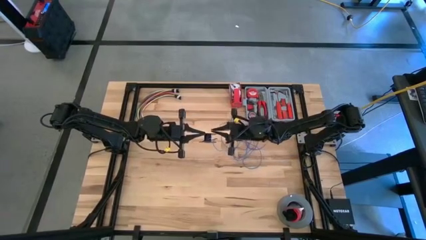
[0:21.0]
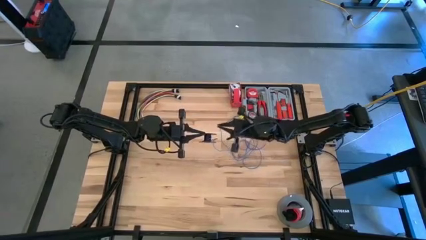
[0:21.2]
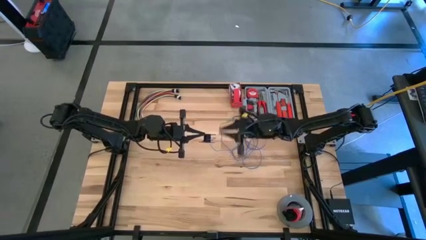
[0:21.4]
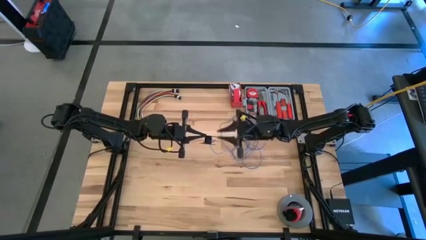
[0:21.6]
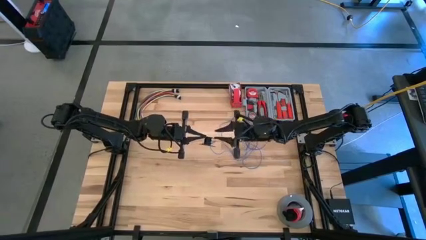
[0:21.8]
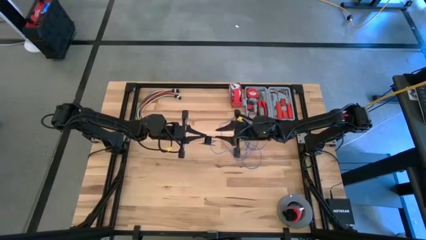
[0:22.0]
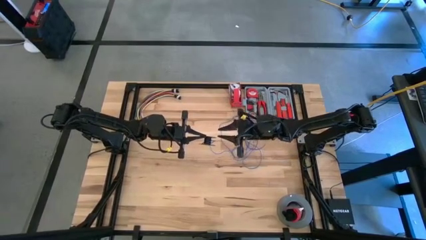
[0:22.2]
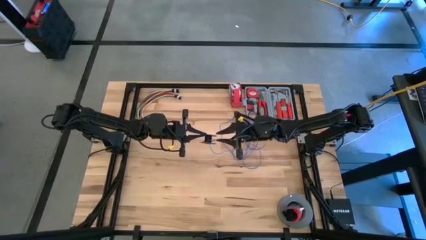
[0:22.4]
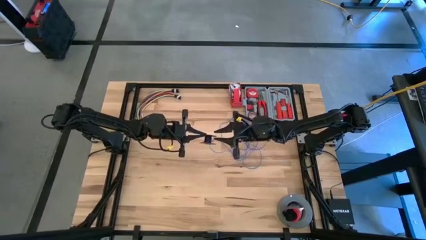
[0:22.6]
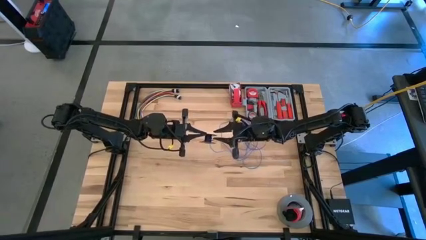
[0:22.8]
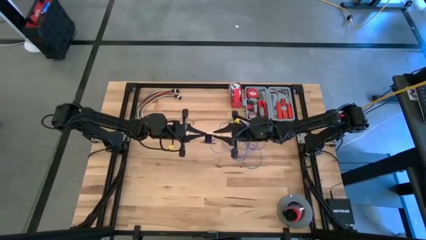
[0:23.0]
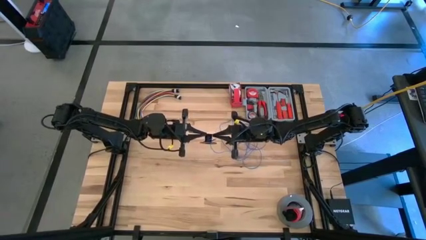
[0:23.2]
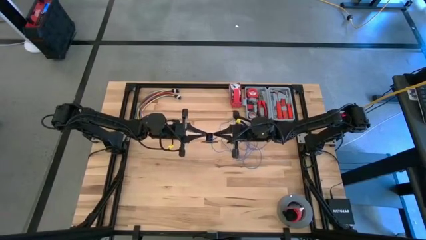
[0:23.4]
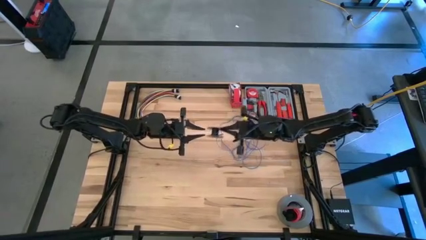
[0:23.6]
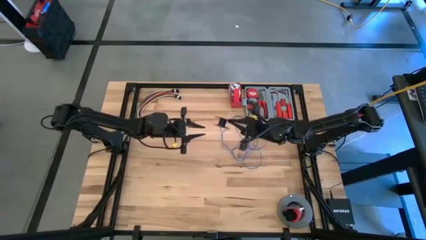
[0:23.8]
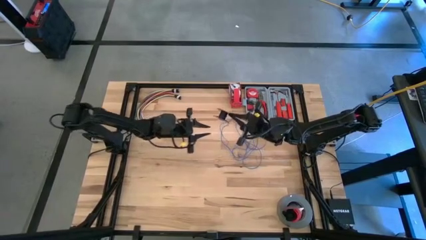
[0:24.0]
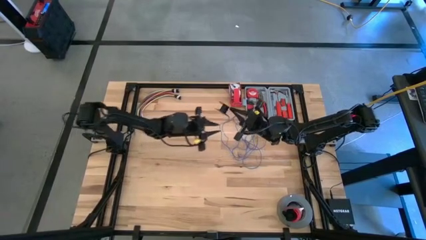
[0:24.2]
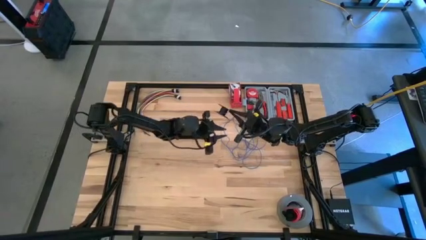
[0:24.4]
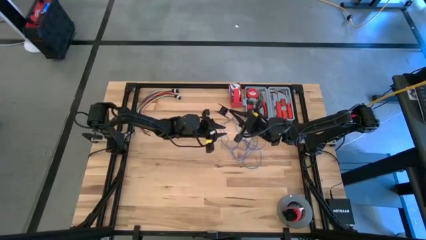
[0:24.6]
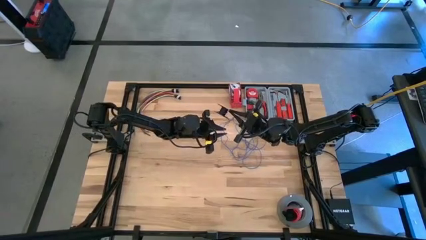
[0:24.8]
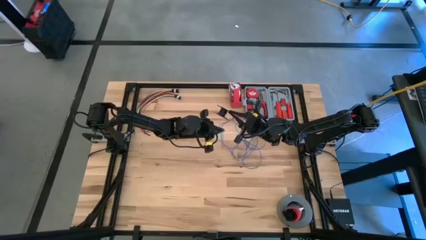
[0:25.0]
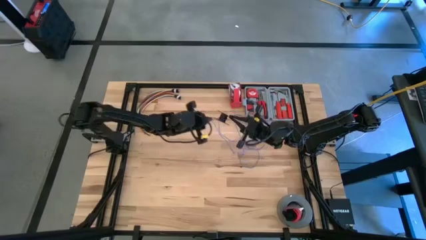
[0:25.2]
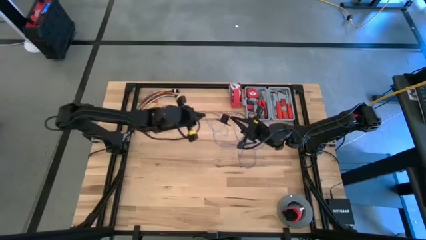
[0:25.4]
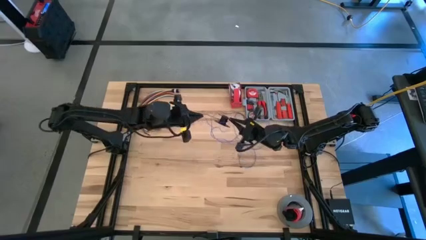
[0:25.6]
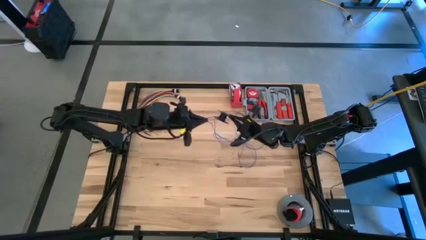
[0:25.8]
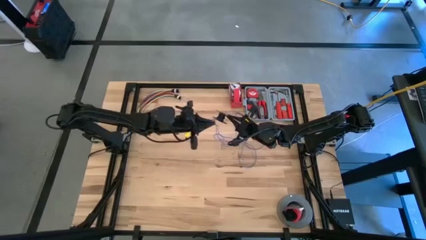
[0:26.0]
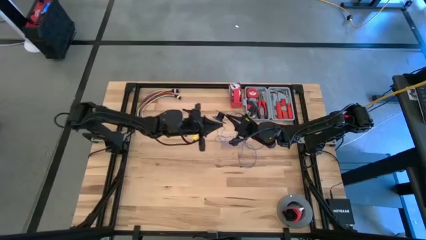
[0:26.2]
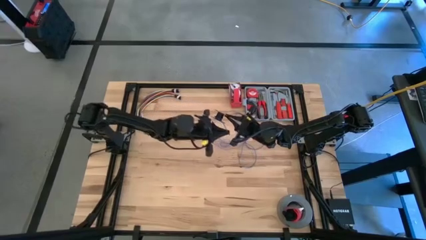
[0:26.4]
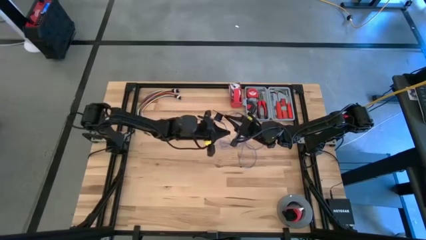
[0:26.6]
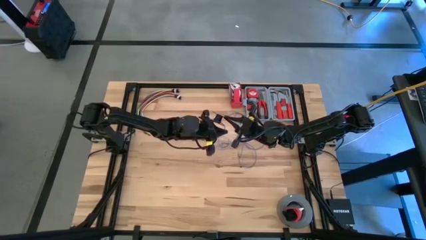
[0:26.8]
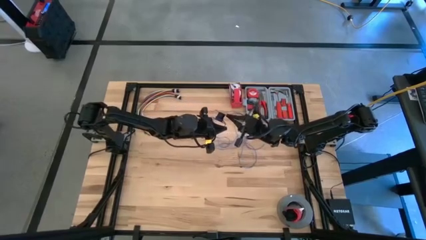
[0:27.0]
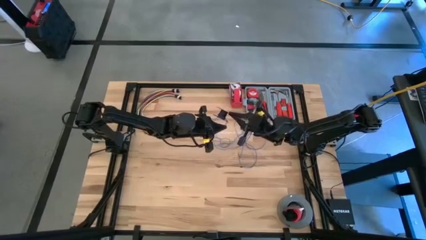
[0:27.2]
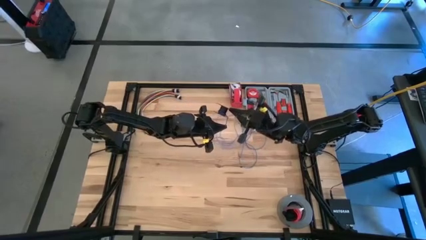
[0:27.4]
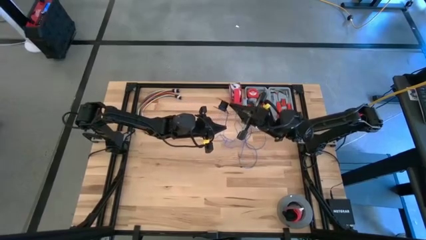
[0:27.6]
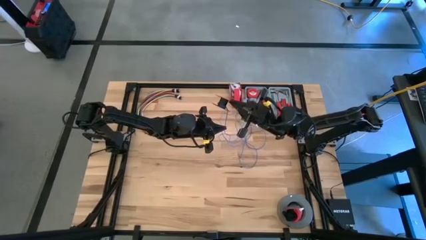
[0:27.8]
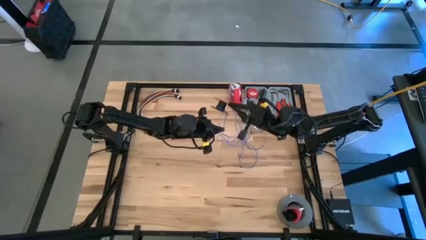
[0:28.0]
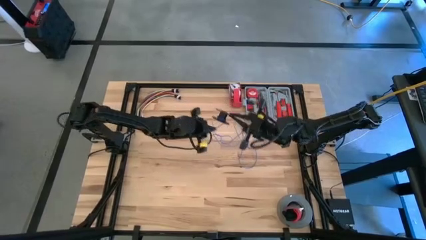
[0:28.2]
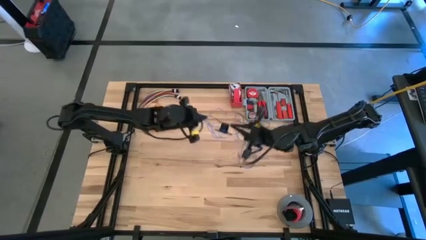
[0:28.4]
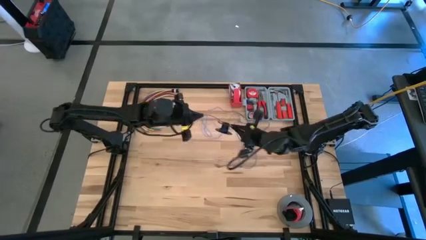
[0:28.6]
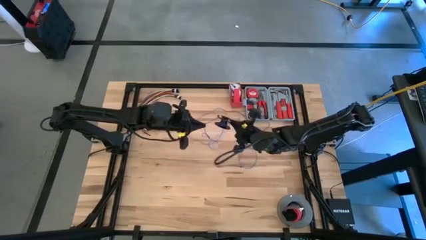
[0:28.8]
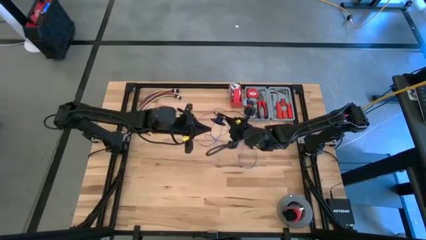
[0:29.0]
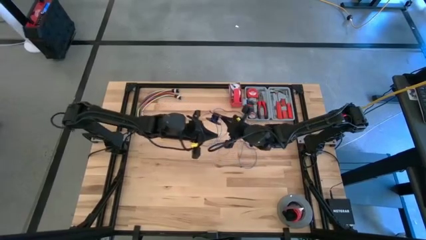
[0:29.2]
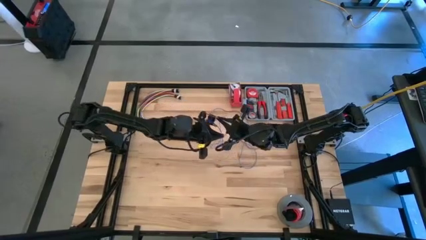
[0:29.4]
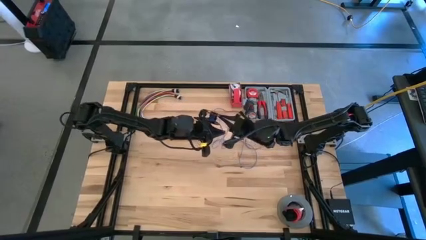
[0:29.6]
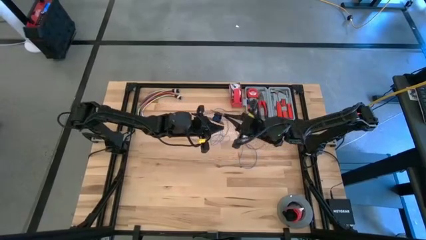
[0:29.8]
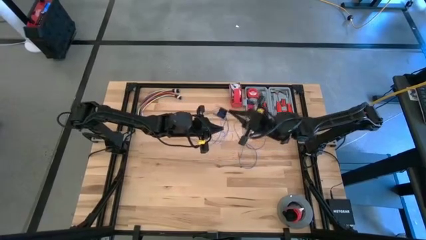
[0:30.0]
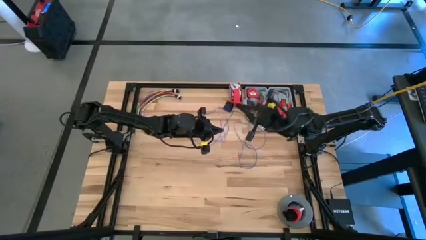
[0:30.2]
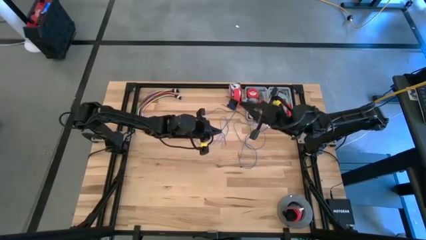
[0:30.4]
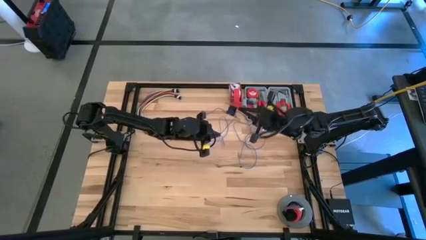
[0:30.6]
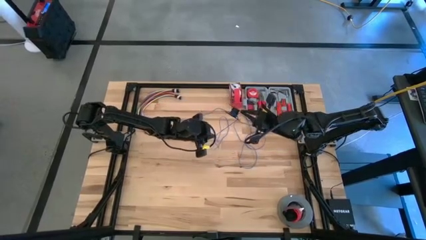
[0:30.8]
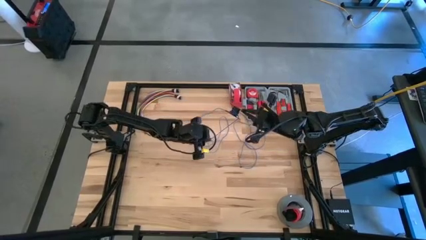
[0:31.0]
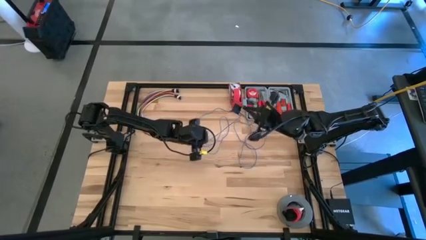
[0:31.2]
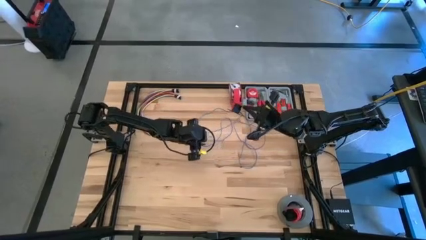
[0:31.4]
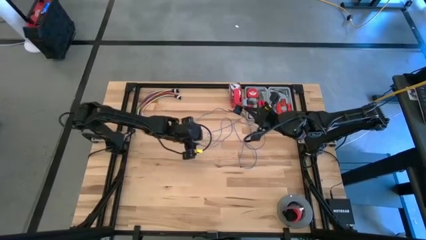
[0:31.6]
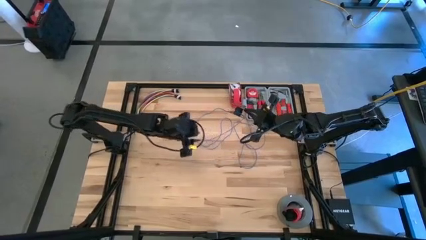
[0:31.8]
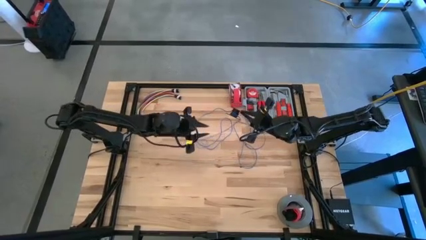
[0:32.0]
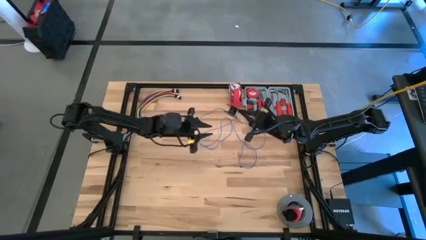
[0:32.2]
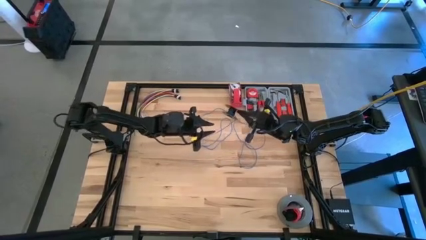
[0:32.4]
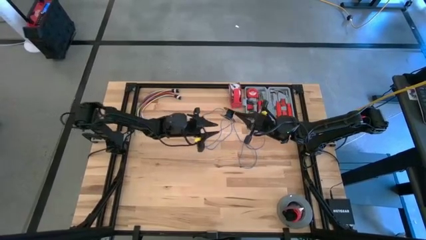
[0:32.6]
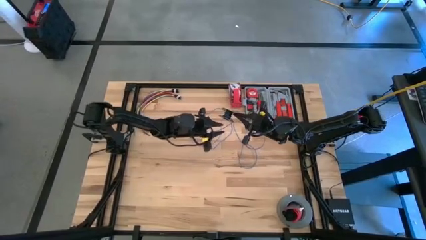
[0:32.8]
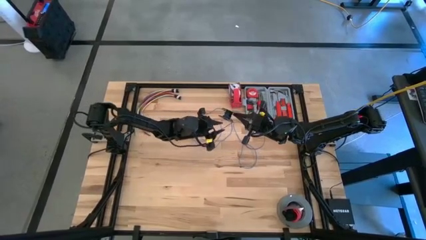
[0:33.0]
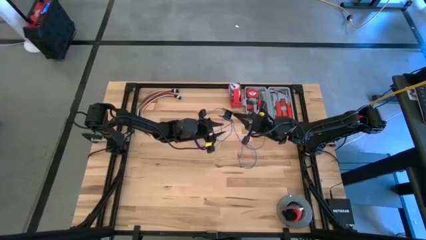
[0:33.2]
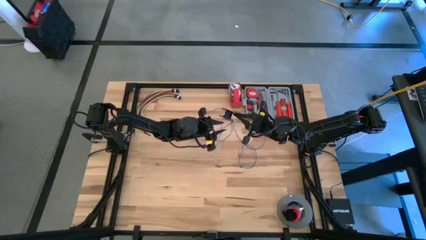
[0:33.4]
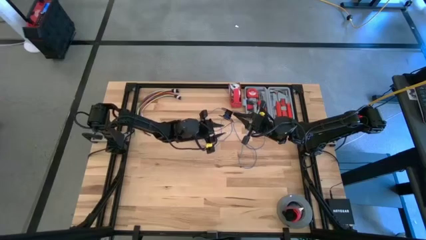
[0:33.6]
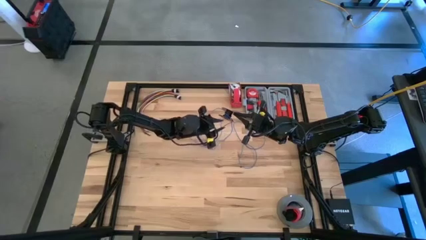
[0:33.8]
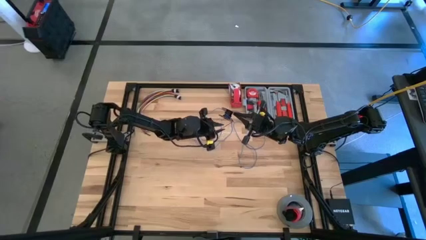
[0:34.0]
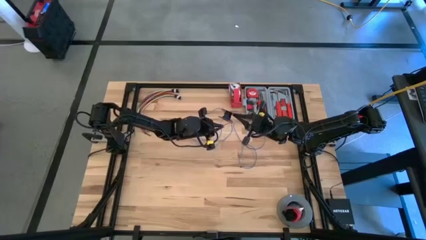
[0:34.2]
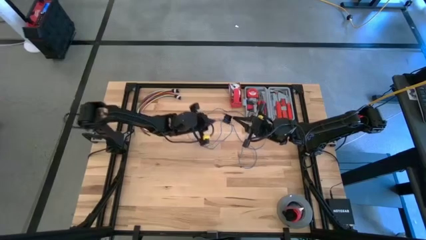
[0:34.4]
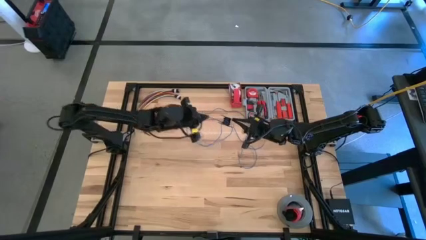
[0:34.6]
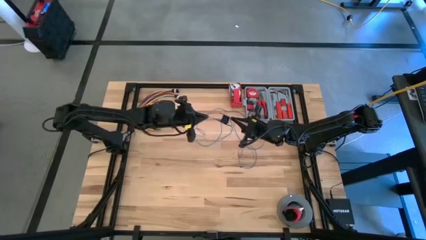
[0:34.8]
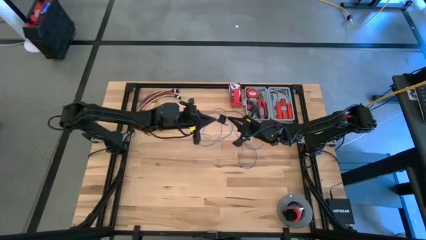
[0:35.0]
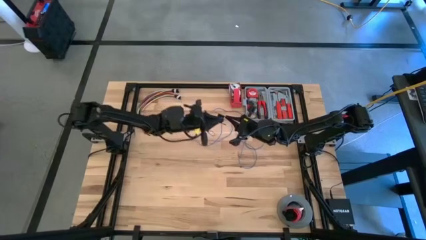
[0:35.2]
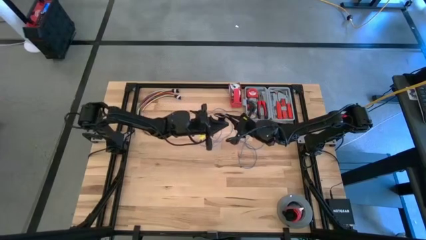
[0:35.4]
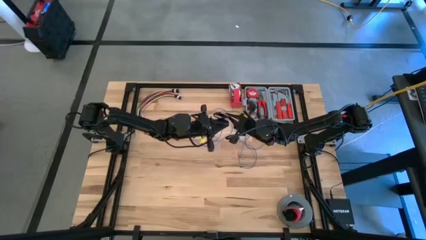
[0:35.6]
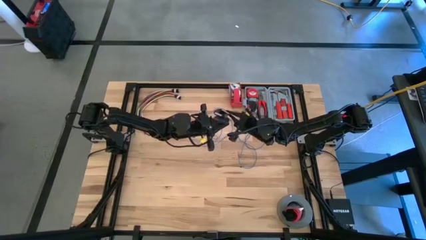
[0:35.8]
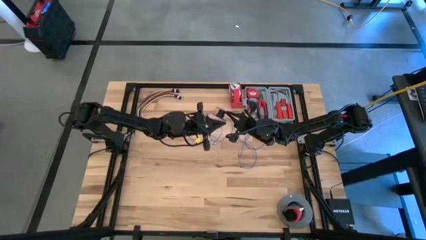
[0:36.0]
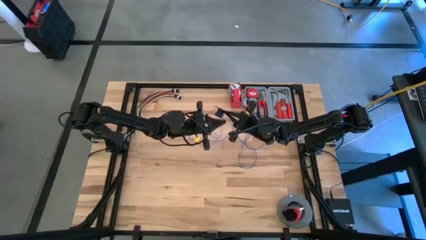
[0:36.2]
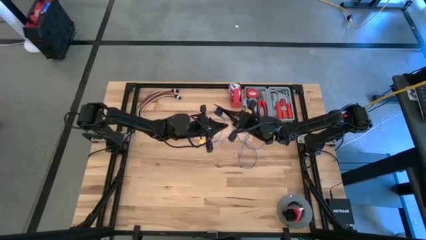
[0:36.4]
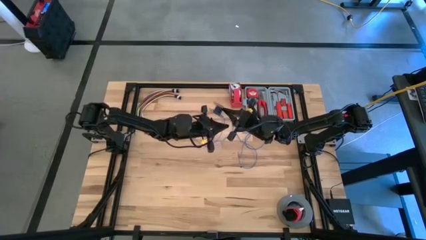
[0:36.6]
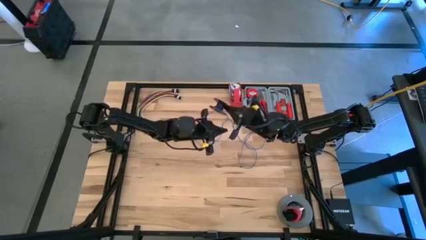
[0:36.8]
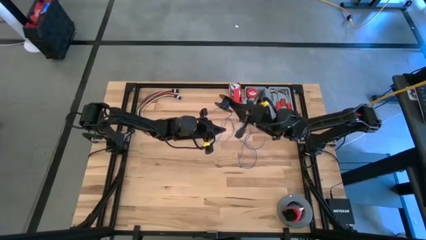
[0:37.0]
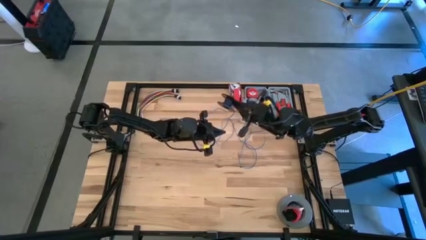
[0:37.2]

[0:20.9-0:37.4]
Task: Coil cords
Coil the blue wire on the black spool

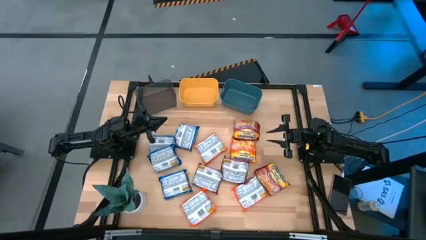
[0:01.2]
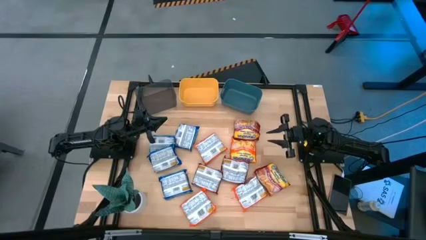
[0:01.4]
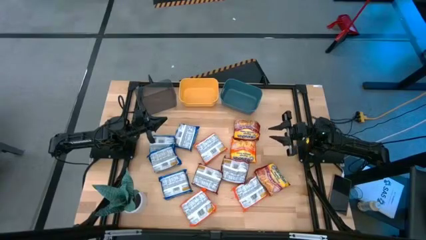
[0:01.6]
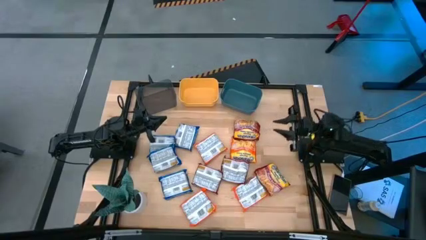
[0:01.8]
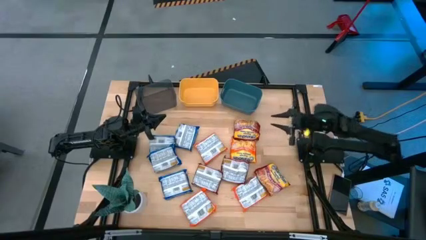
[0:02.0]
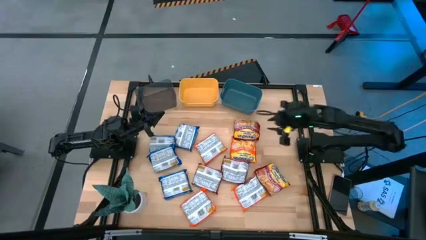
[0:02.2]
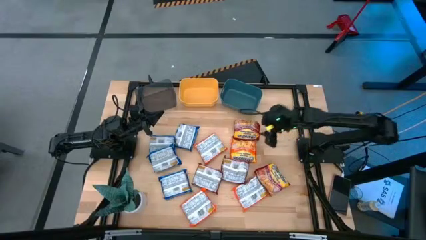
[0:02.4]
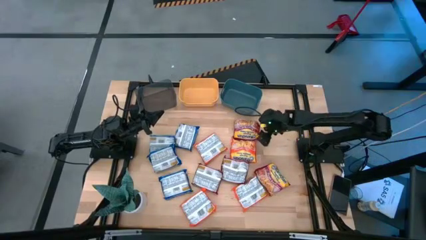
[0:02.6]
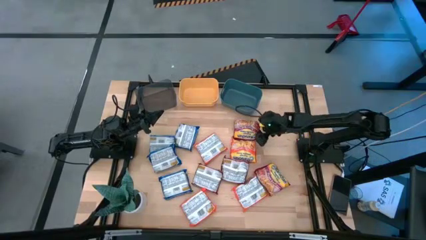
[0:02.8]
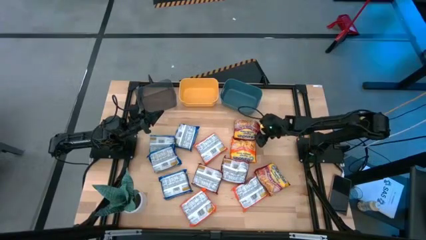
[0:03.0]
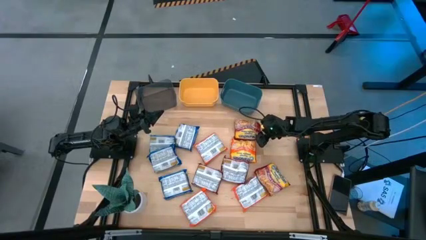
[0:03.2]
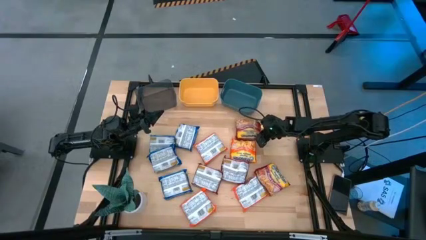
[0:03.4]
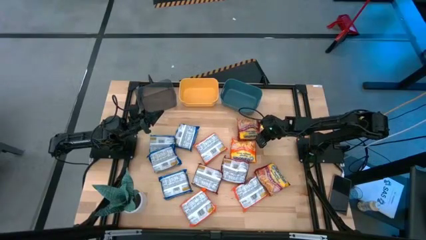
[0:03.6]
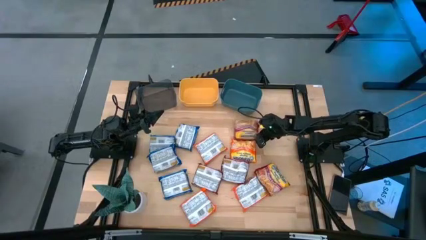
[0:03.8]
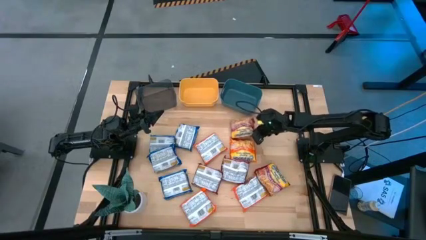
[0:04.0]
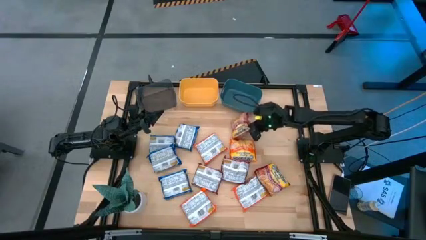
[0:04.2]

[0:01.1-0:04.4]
Task: Sort Maruchan noodles
Put the red noodle pack into the blue bin
